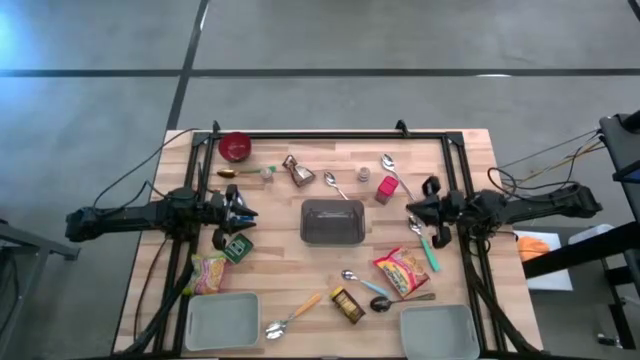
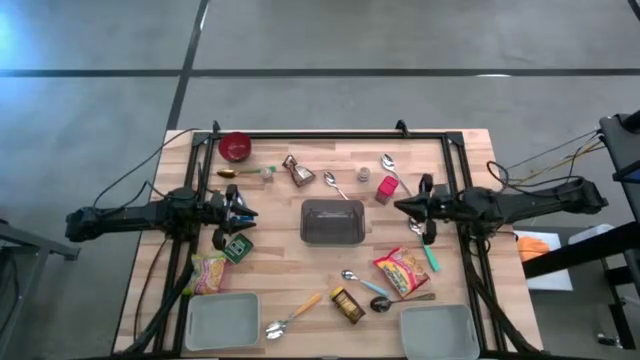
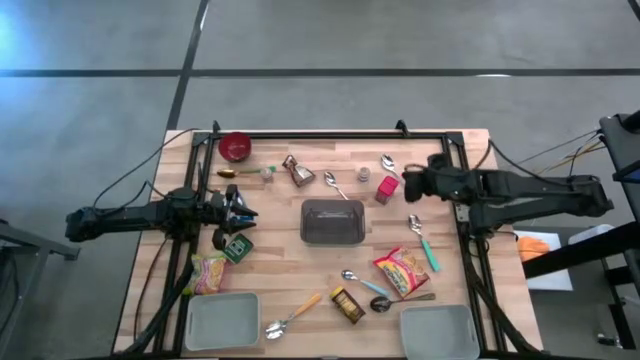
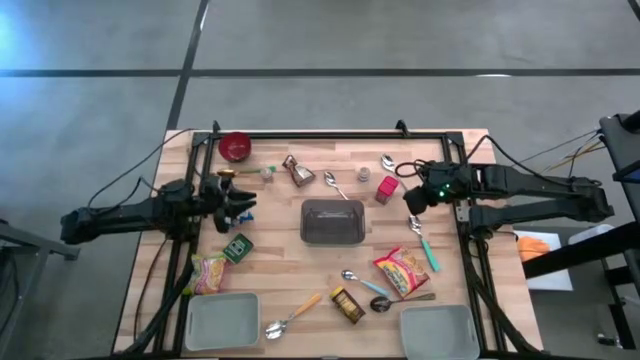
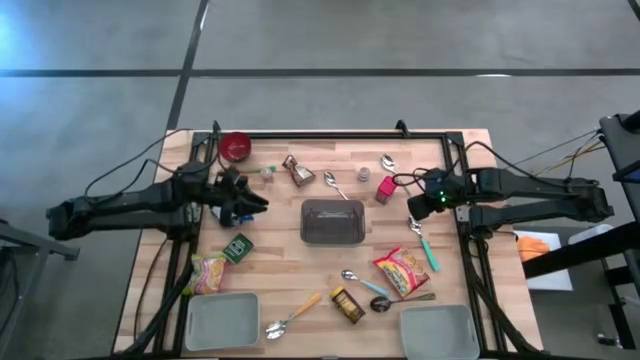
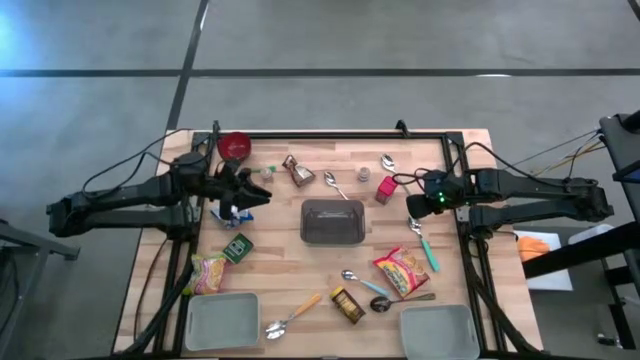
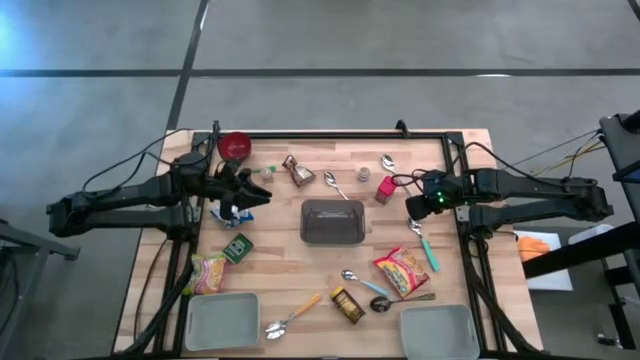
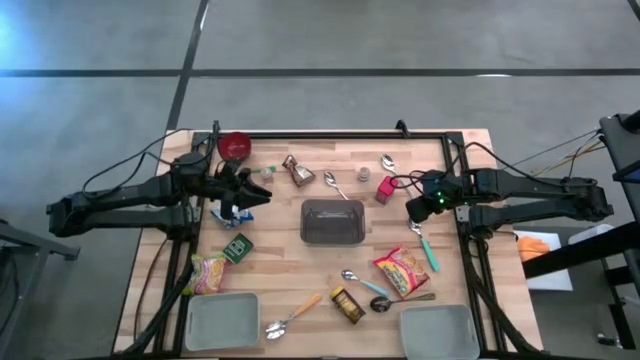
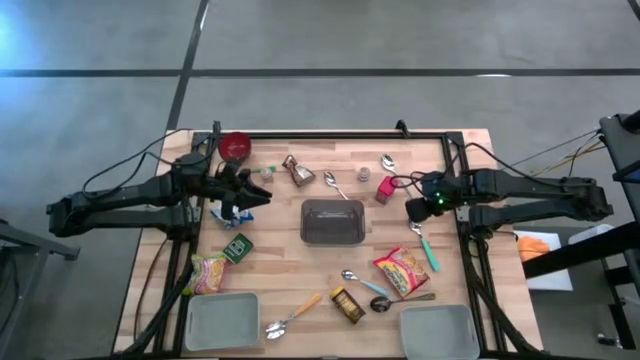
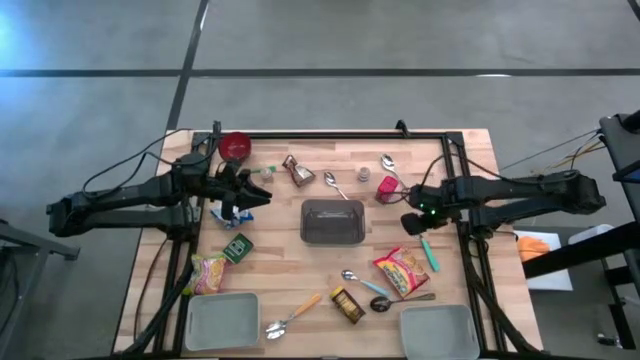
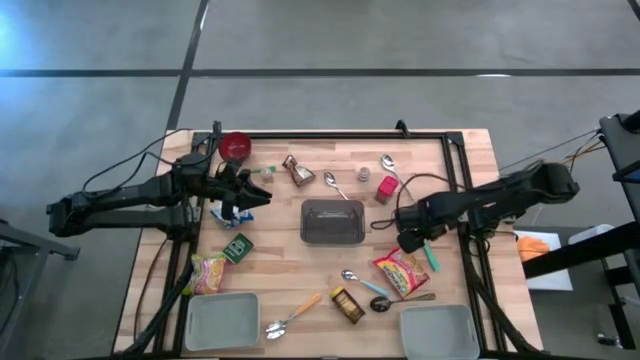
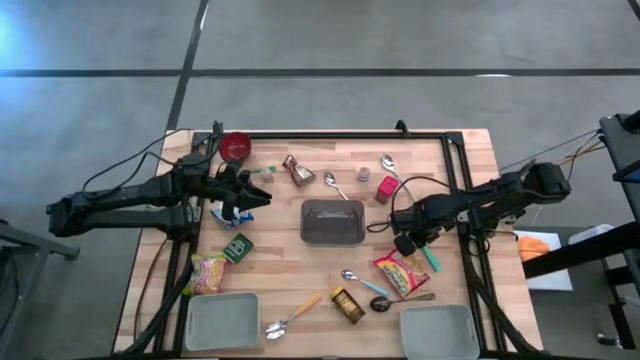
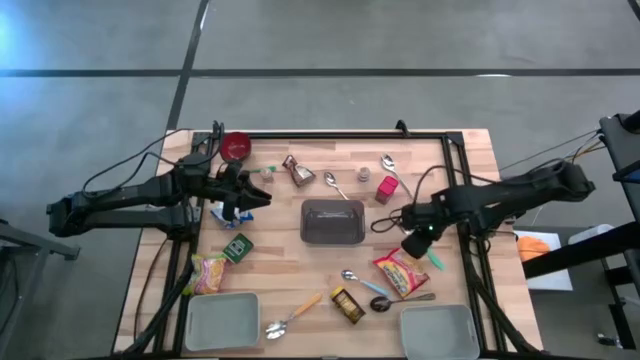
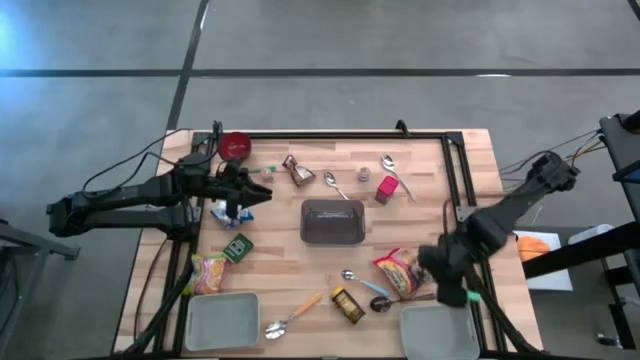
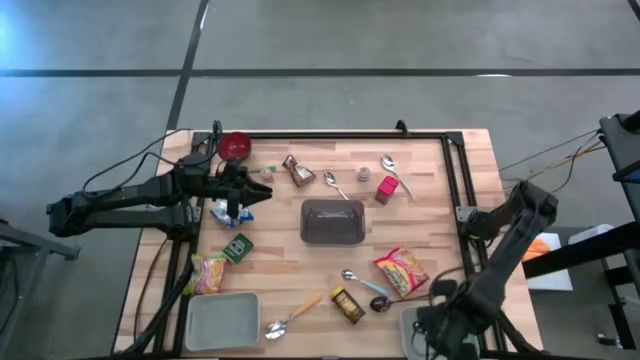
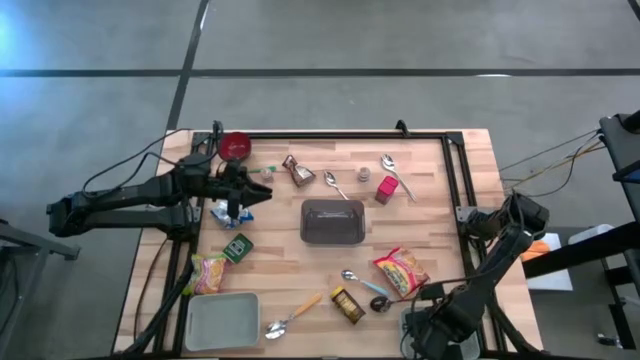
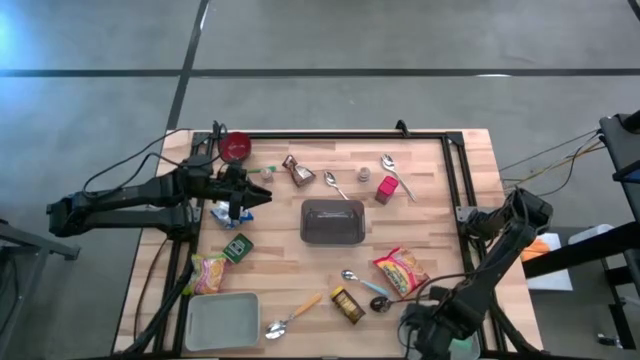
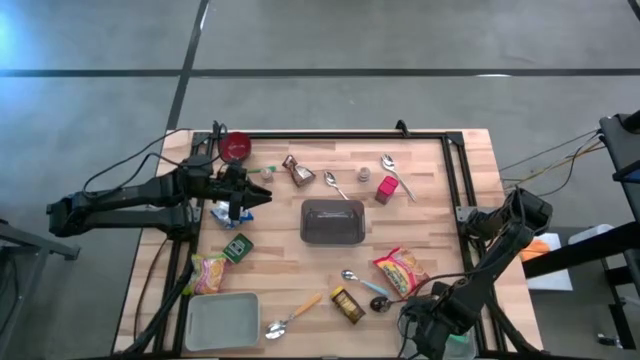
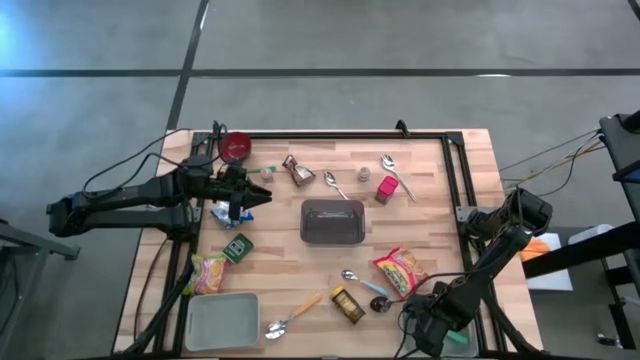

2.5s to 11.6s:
Put the light green spoon into the right grey bin

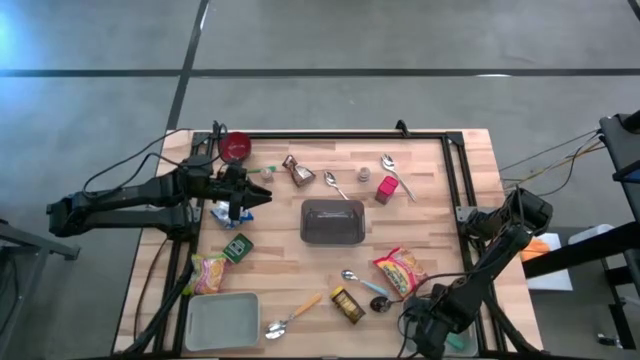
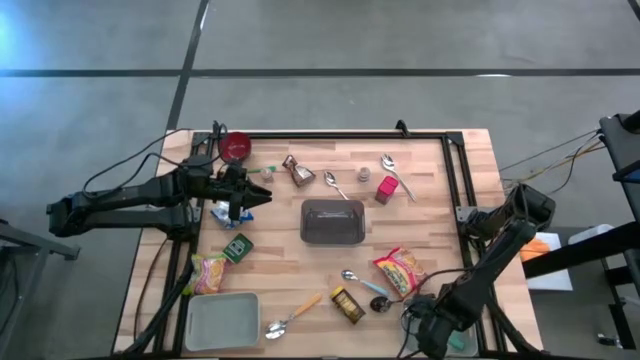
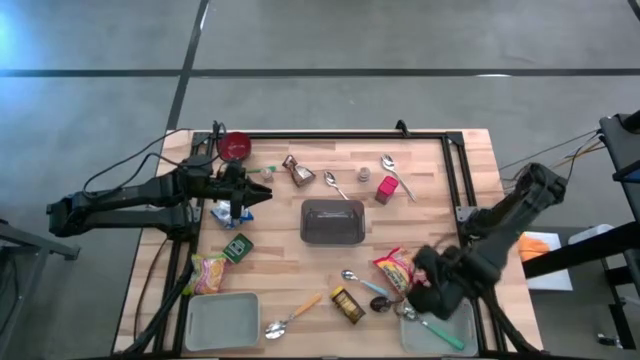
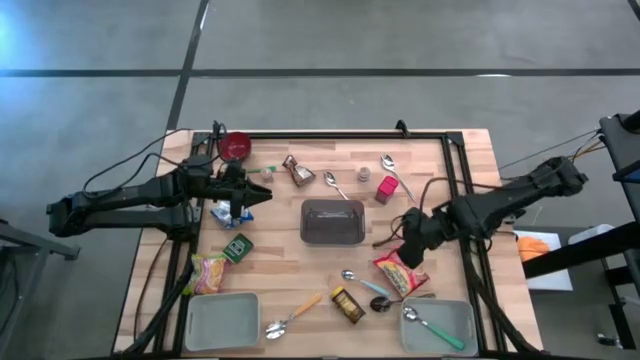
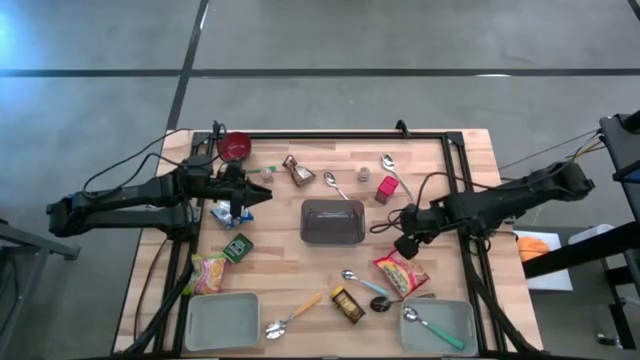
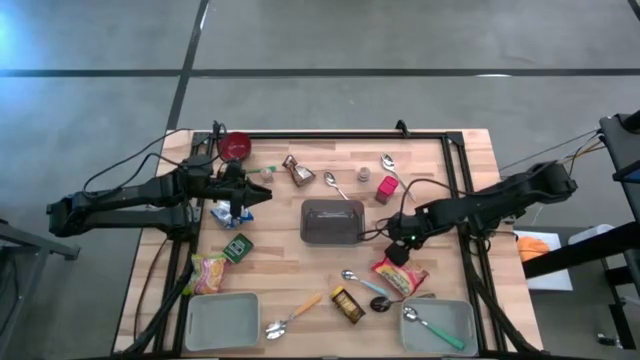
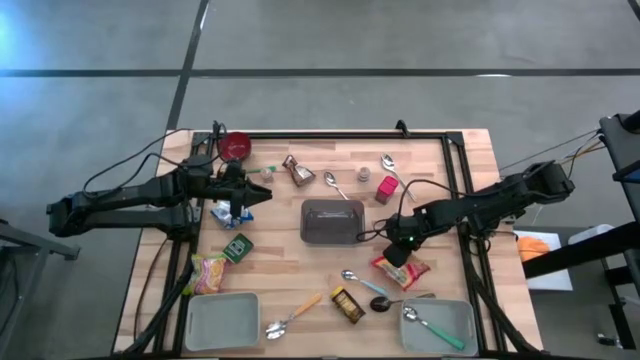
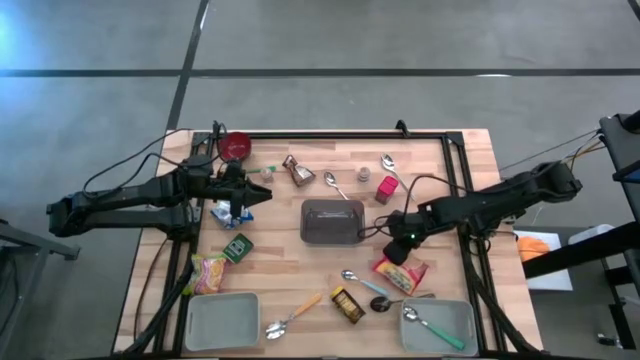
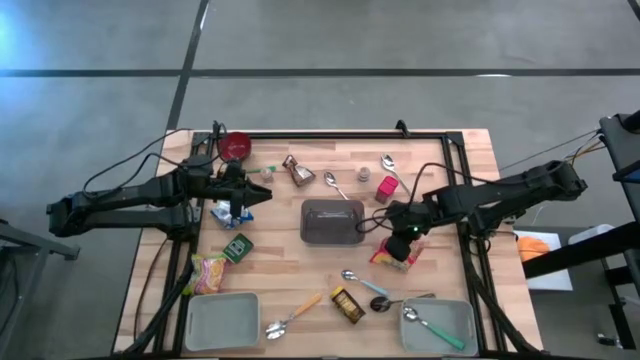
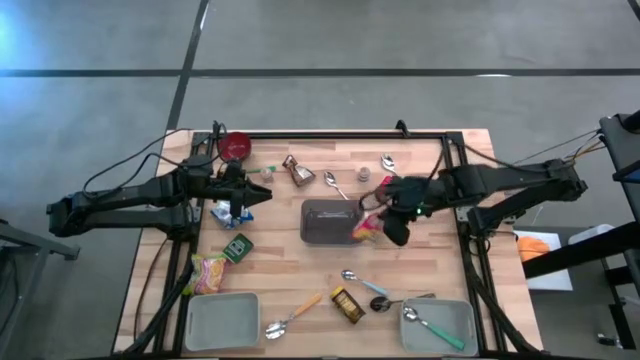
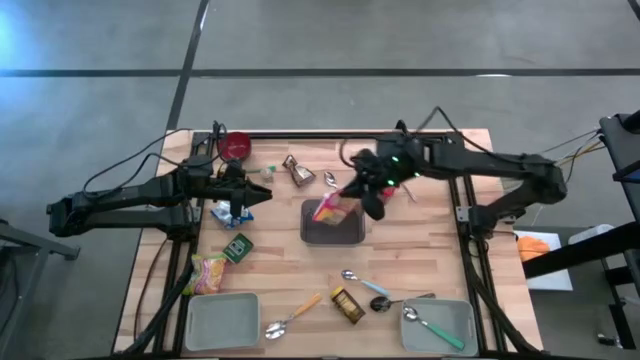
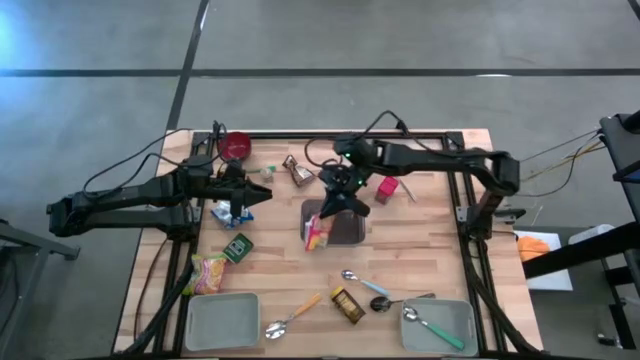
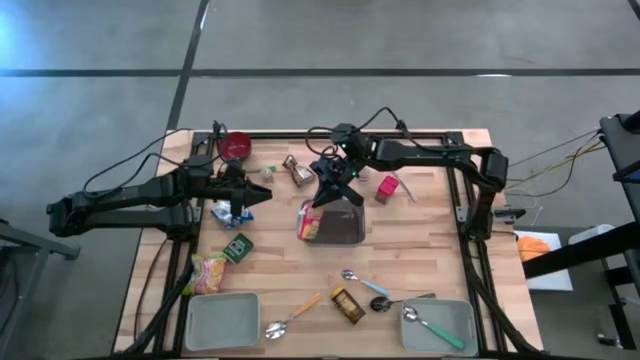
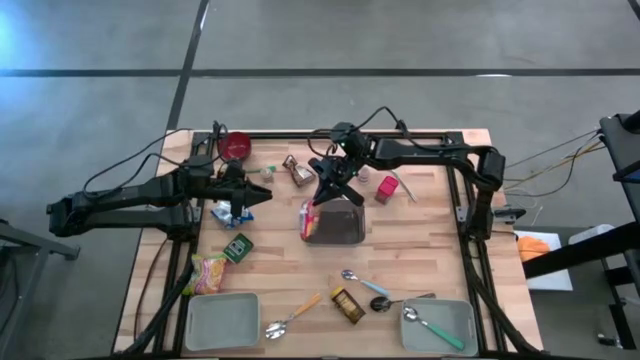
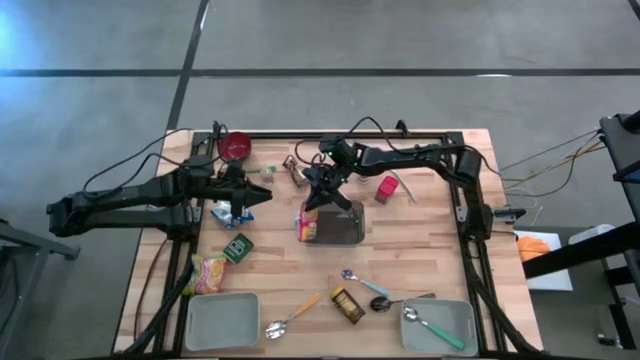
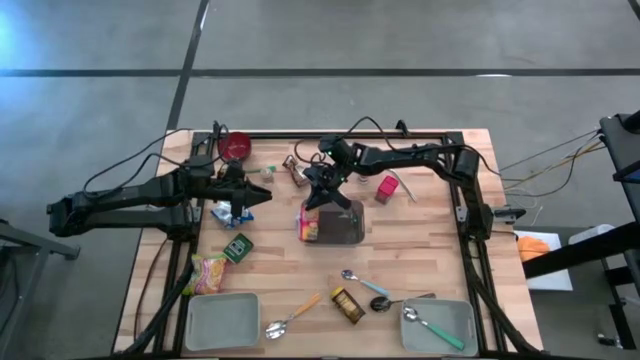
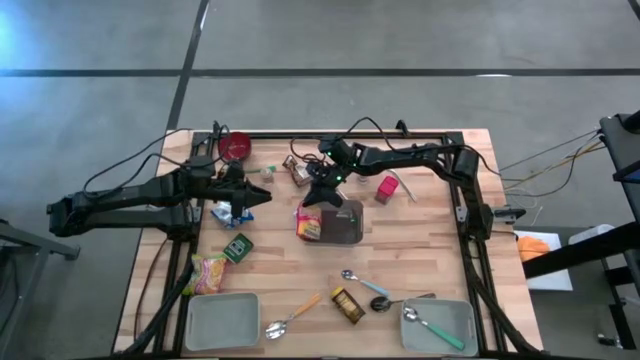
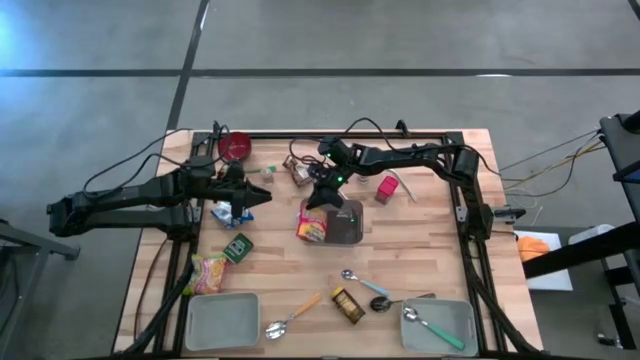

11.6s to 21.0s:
Put the red noodle pack into the black bin

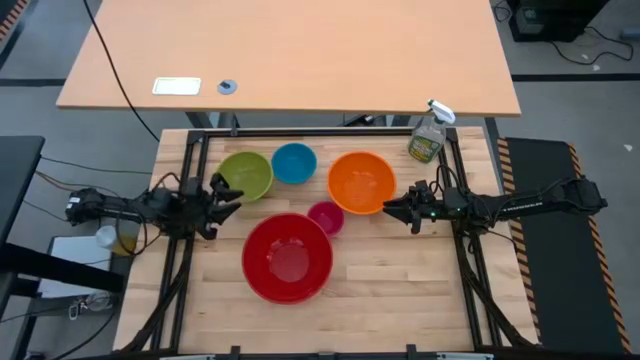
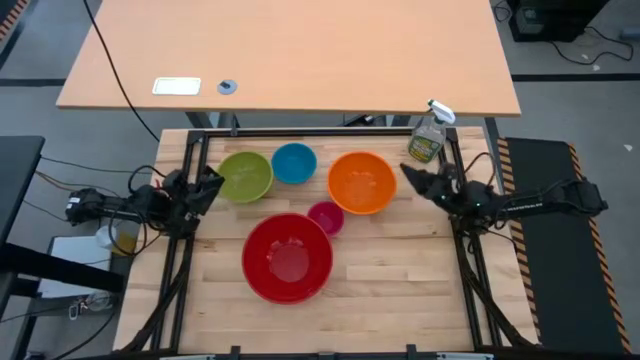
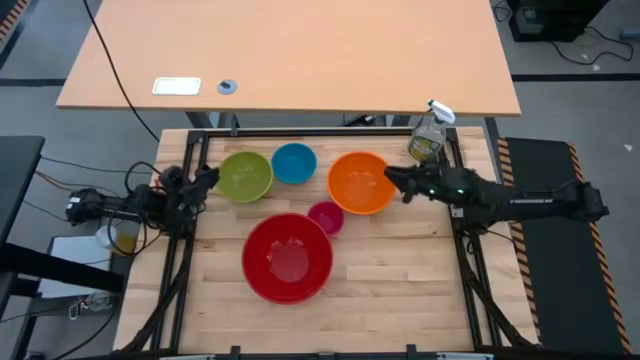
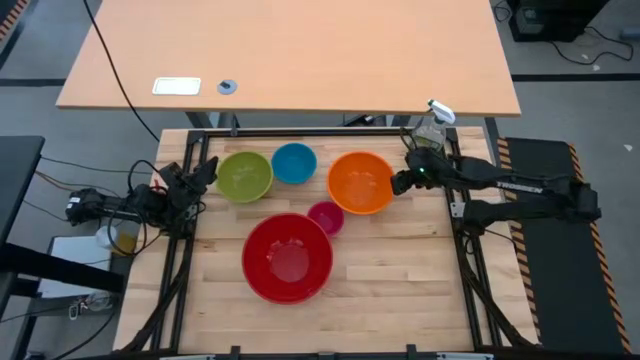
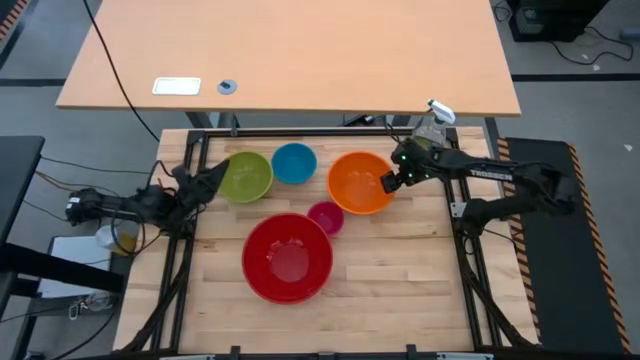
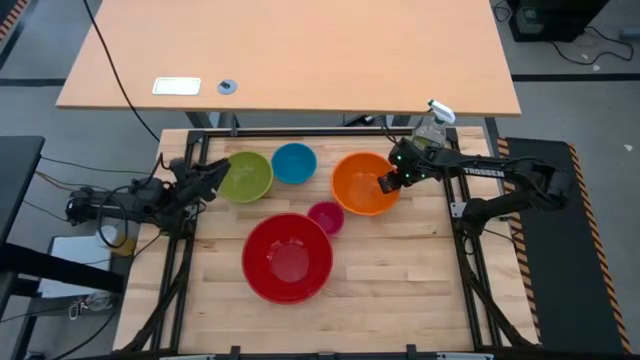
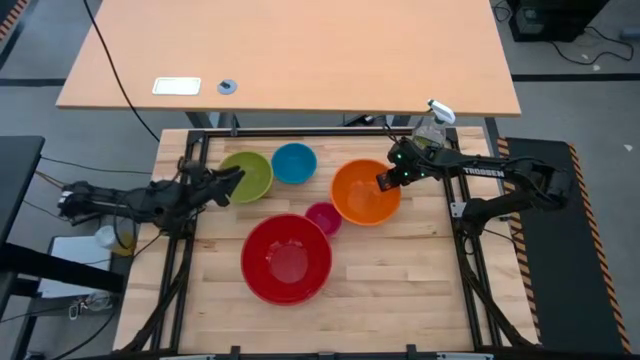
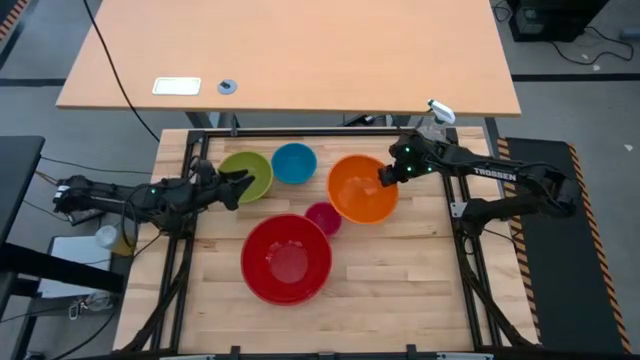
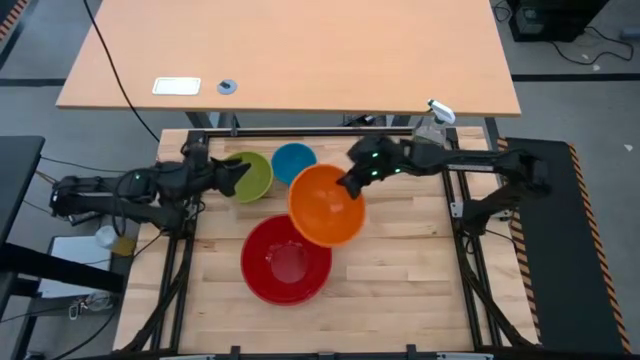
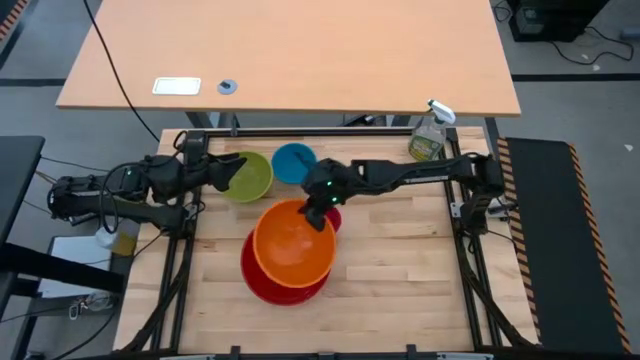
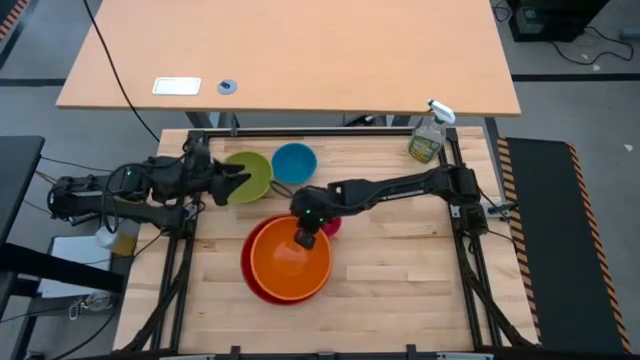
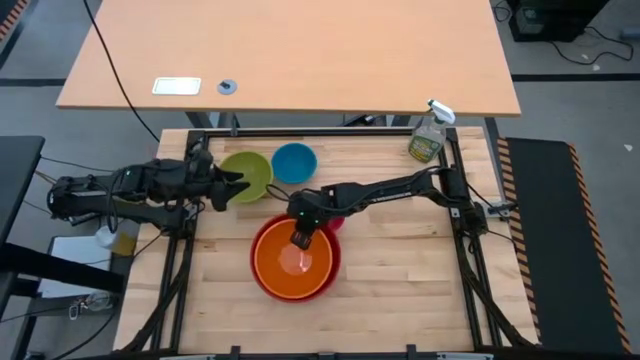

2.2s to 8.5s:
Stack the orange bowl on top of the red bowl
